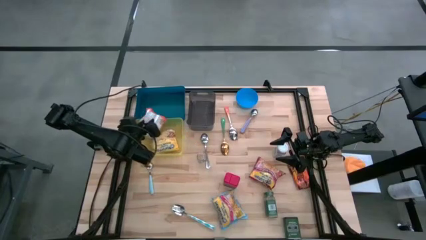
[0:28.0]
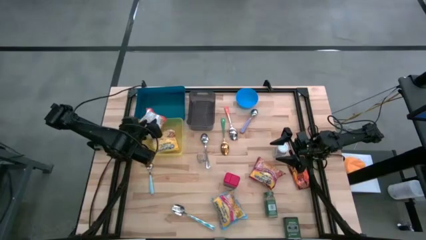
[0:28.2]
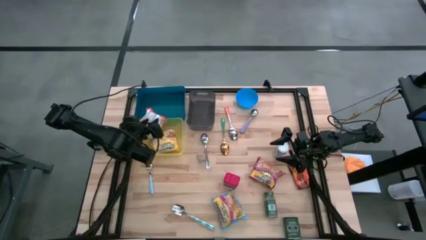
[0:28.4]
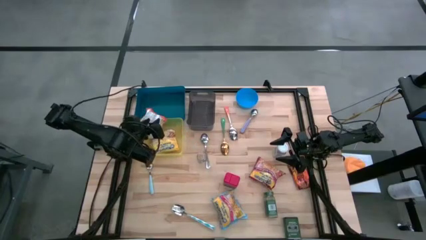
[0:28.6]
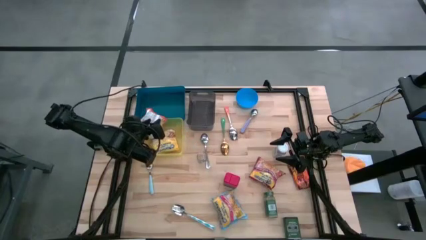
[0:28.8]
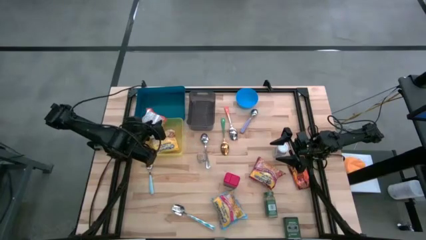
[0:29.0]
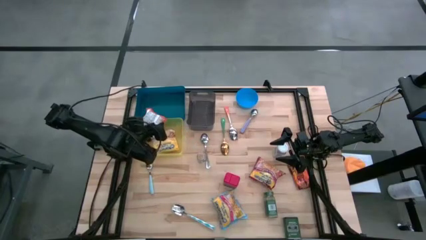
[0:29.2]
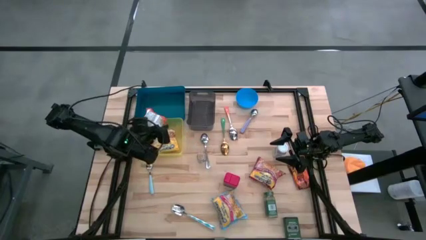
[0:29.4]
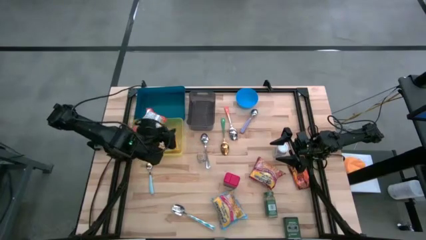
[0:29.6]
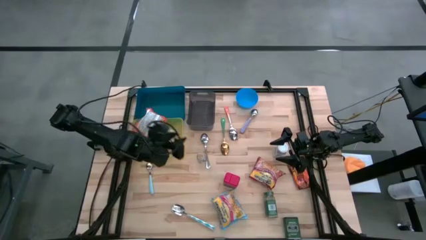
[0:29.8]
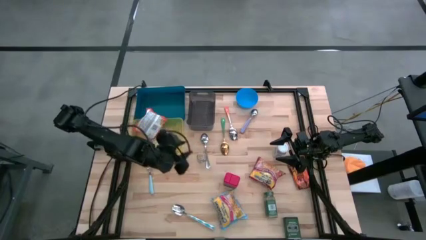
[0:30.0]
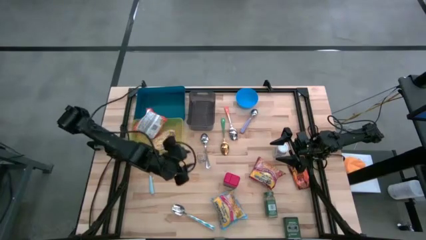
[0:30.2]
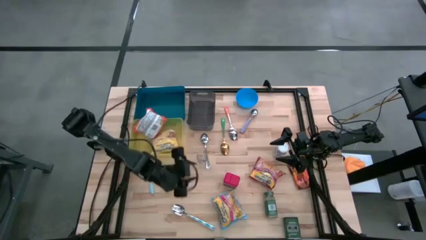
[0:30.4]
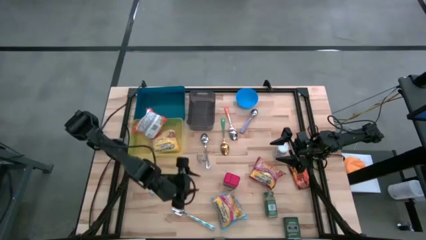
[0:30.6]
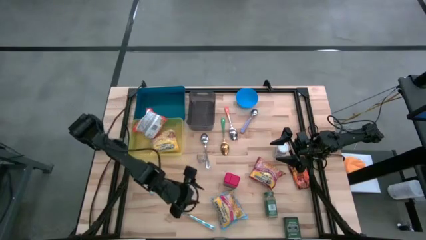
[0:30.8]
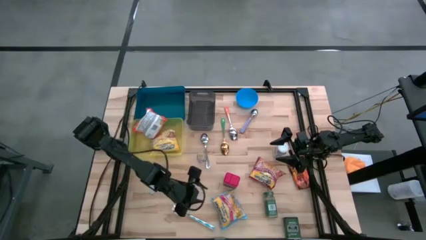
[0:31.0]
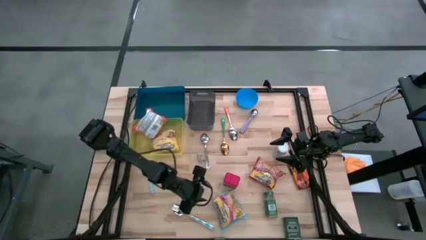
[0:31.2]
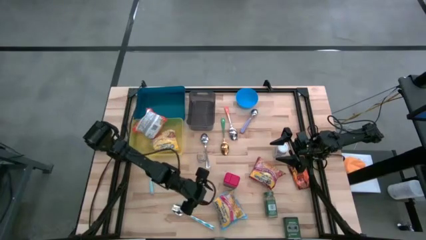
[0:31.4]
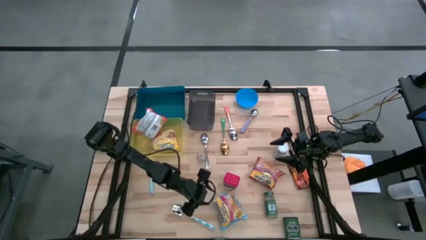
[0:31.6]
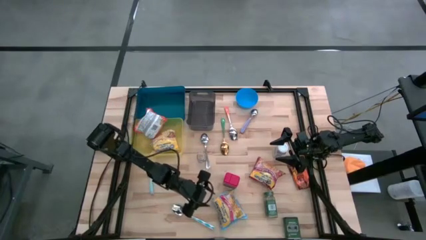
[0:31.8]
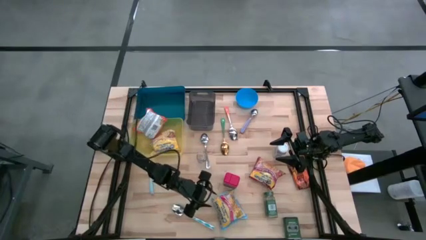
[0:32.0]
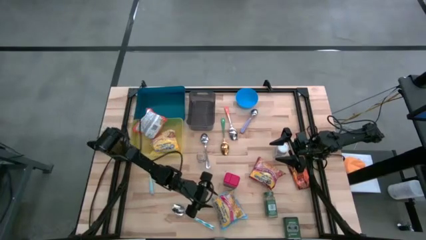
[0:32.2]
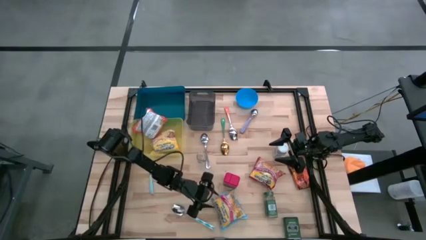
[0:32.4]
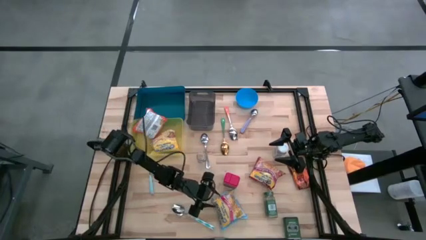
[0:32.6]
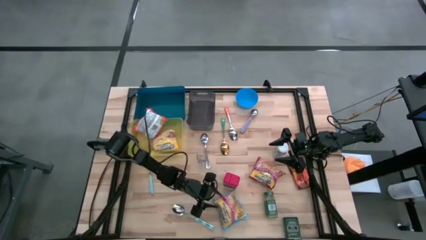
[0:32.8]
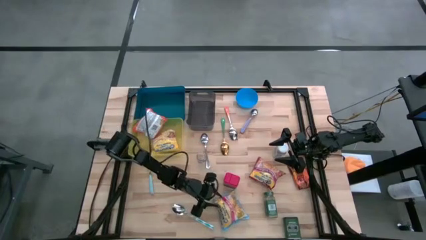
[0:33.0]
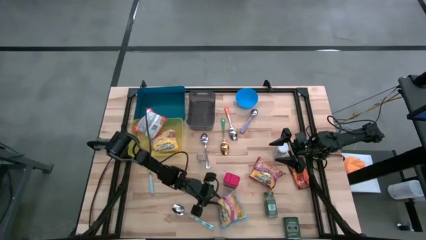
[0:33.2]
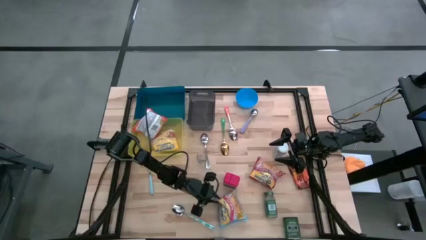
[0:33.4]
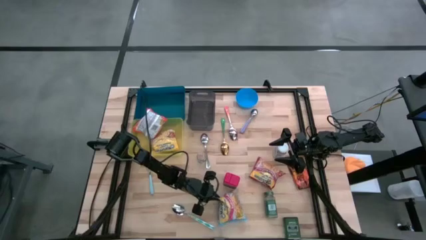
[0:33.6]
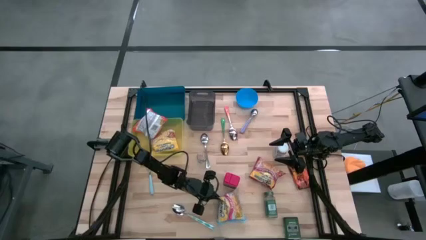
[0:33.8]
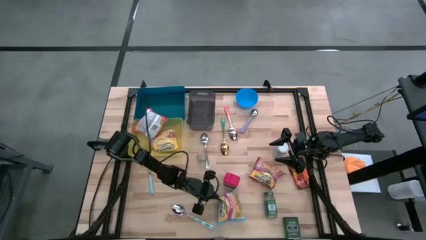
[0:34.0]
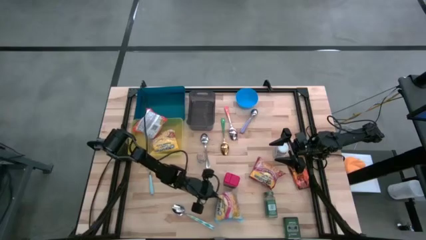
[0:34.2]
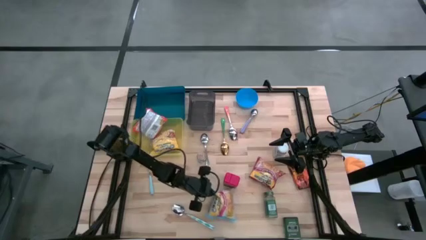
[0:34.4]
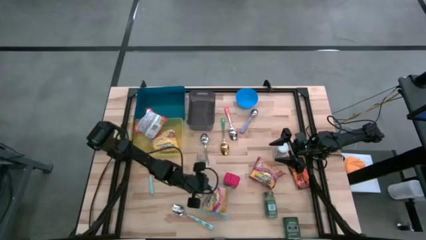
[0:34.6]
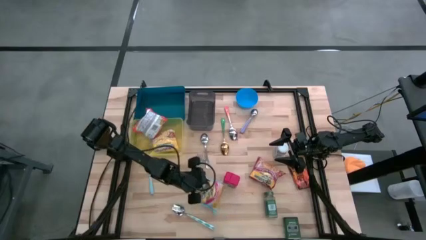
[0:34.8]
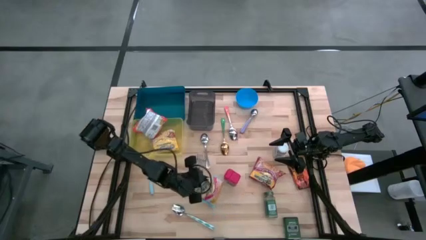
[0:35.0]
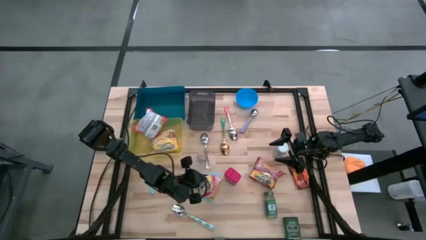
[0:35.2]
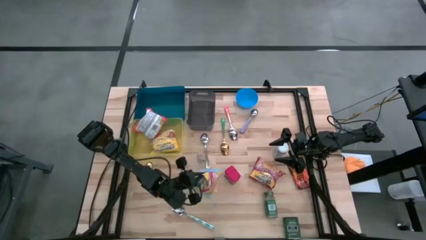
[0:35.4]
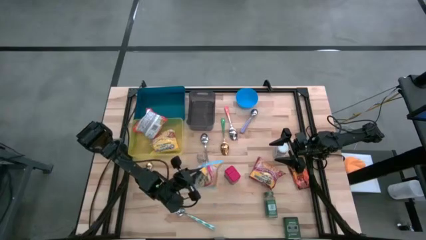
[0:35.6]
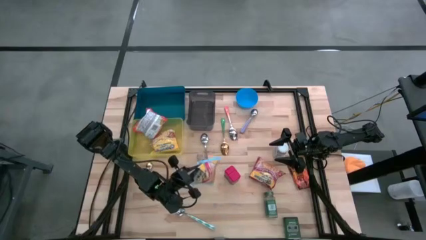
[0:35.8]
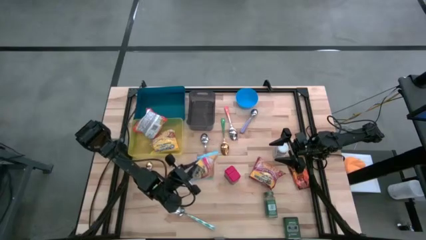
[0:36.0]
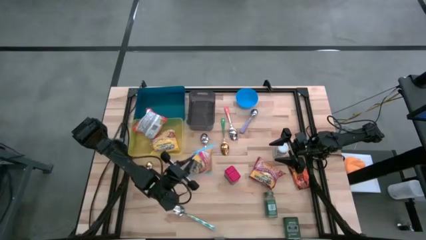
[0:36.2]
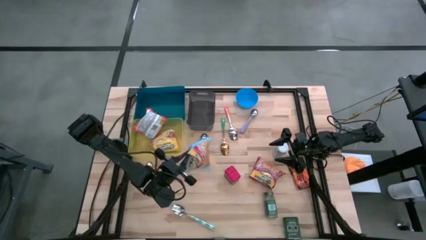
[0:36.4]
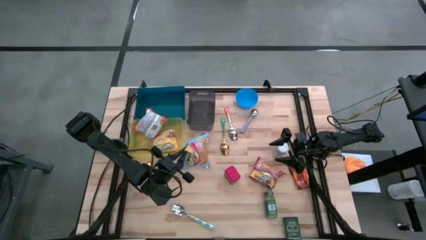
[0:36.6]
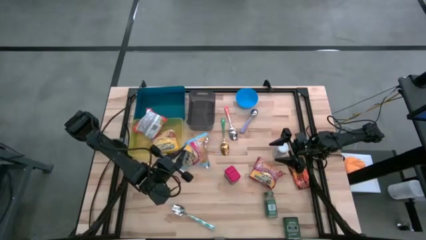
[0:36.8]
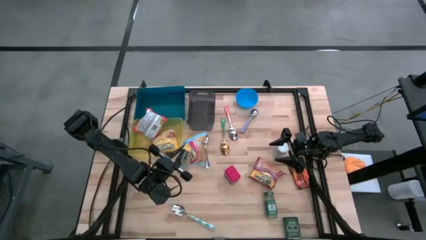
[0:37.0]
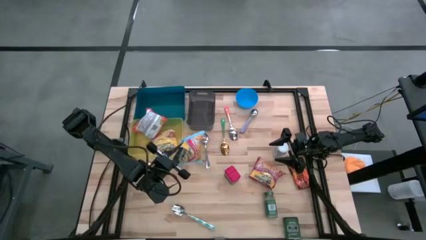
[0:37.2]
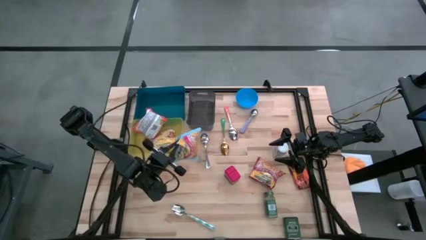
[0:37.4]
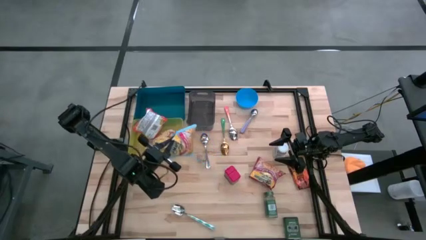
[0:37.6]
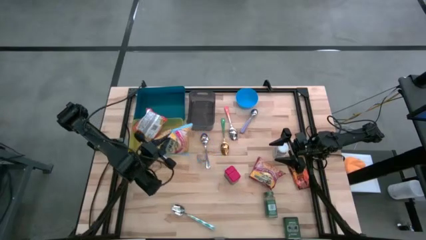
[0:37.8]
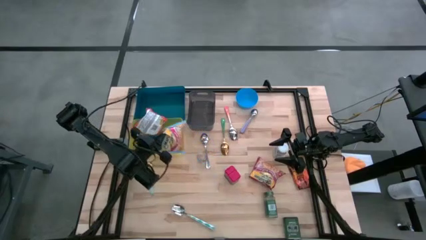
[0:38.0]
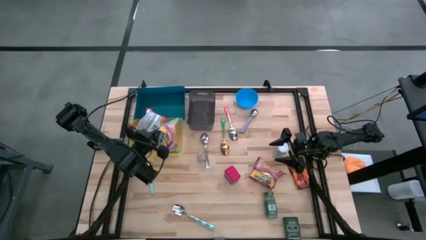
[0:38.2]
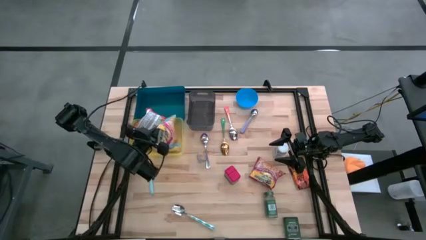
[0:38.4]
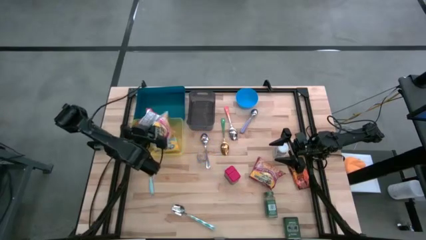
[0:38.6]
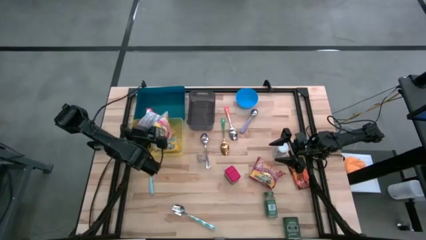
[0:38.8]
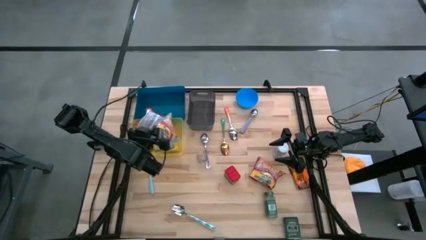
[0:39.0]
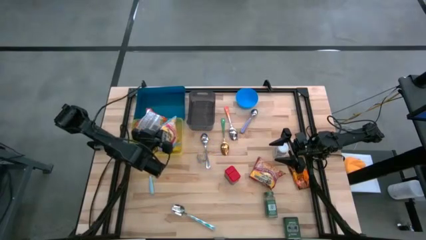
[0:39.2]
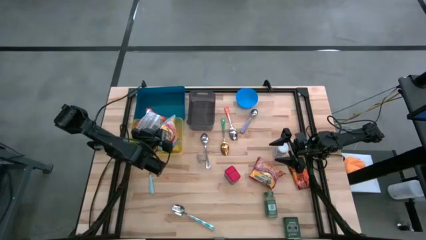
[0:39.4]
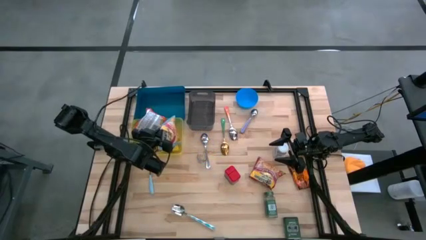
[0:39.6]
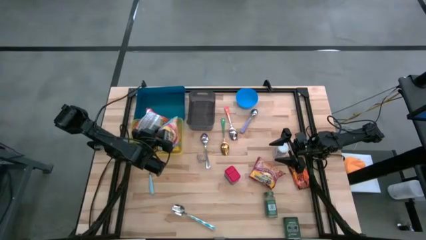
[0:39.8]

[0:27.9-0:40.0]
Put the blue noodle pack into the yellow bin
